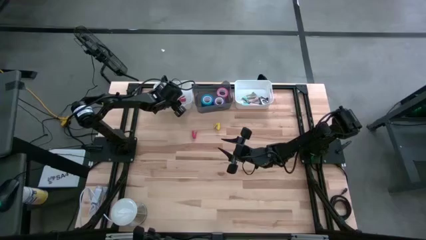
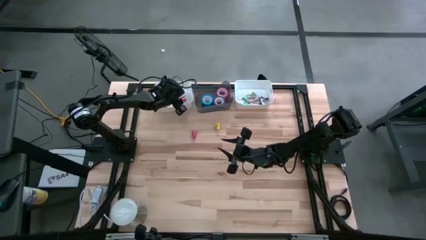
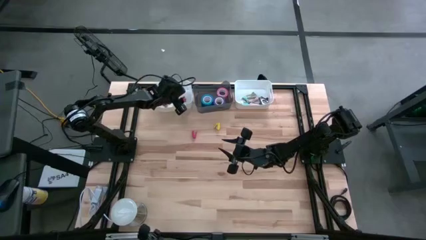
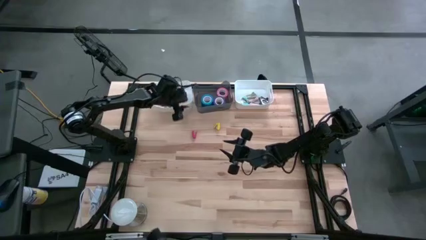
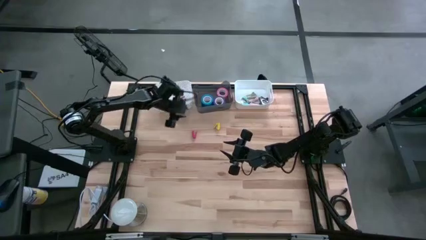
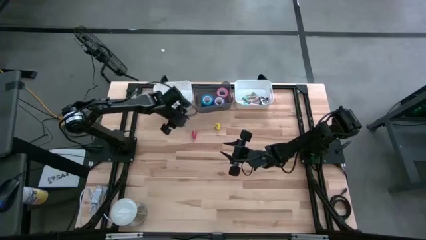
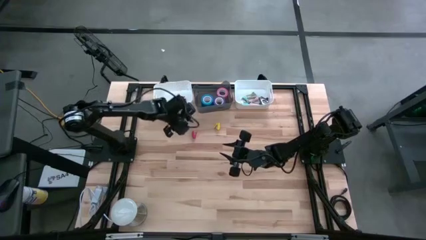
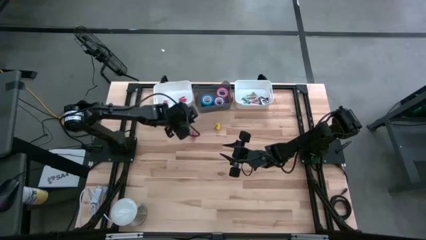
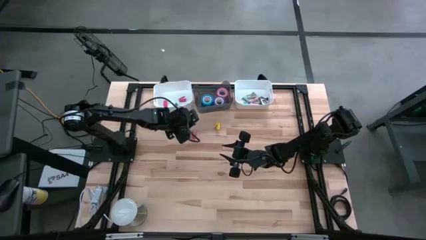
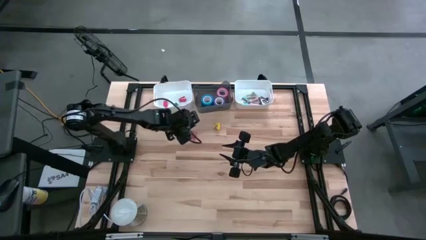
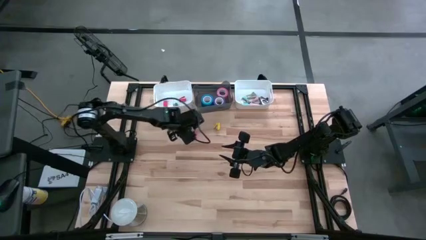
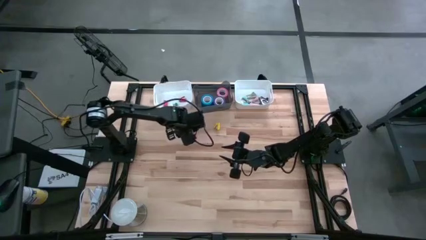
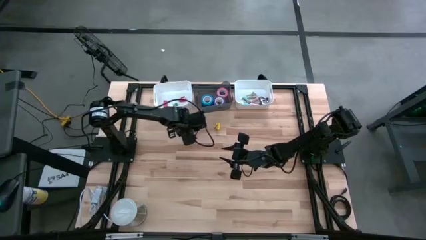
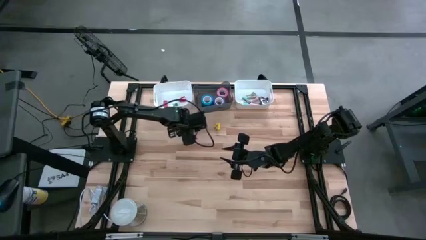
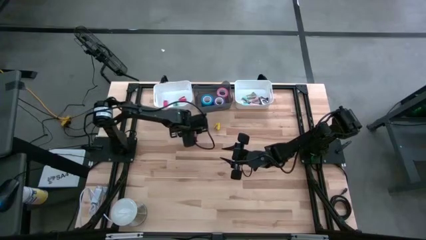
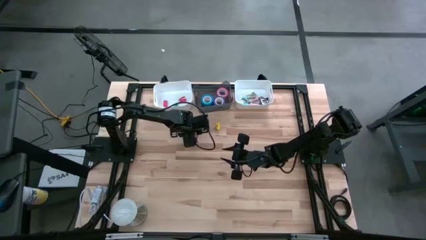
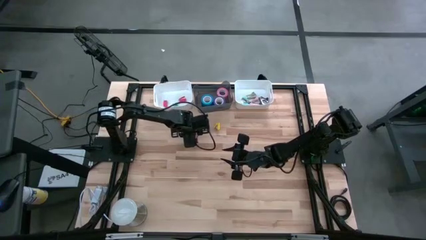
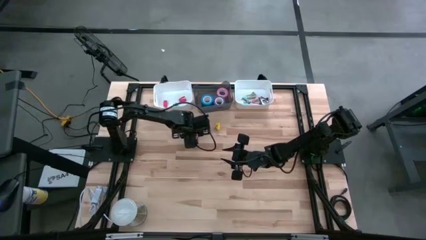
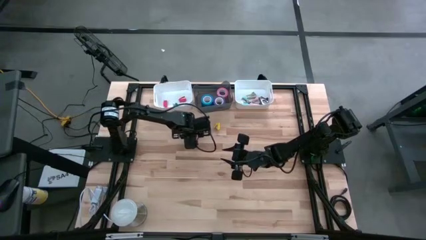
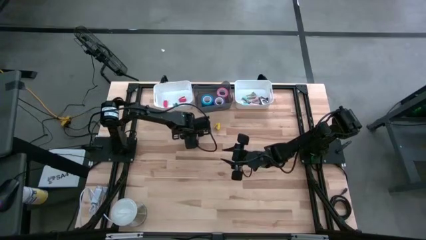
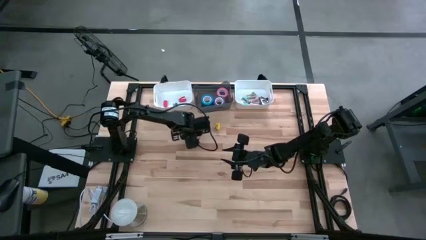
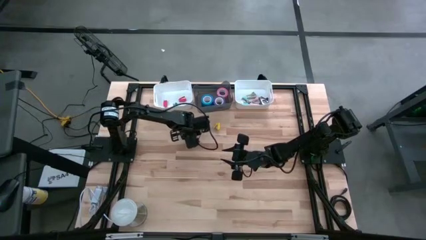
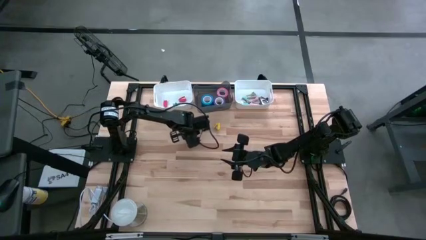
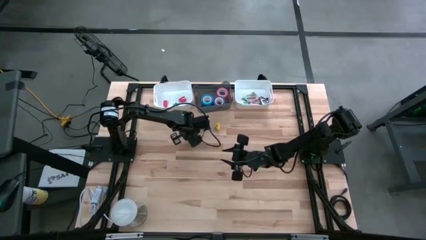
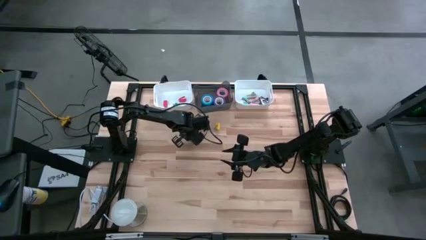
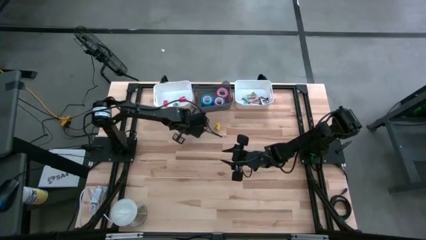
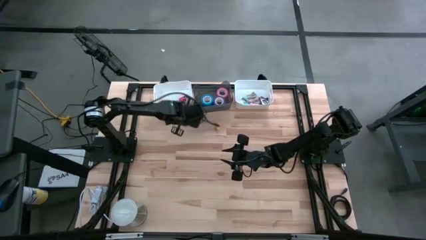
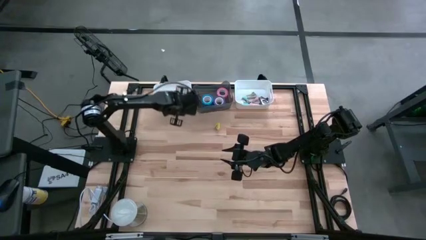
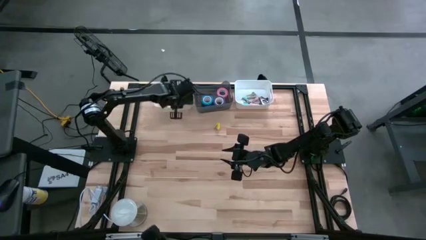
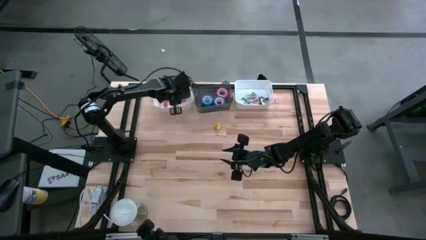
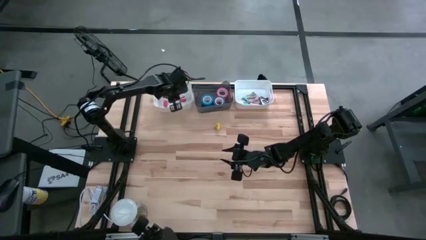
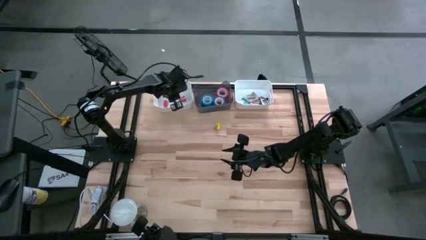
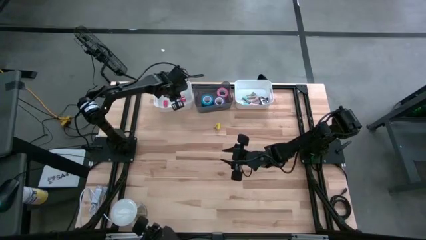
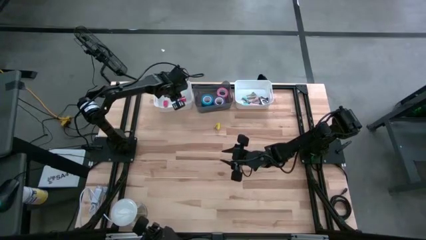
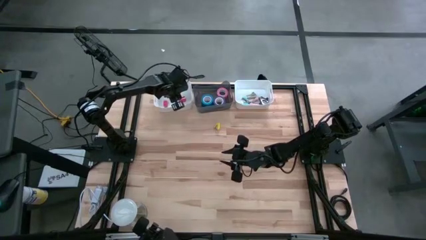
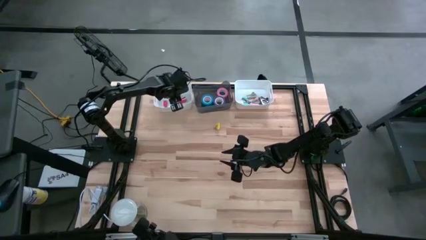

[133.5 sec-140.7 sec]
Task: Pick and place Stapler, Stapler remover, tape
Put the red stapler into the left white bin

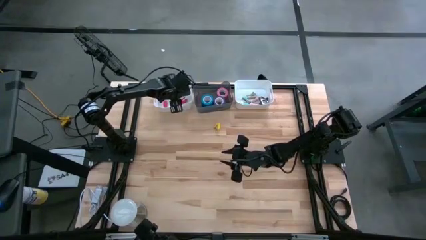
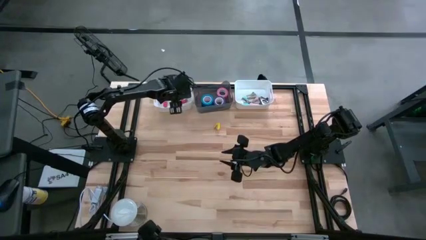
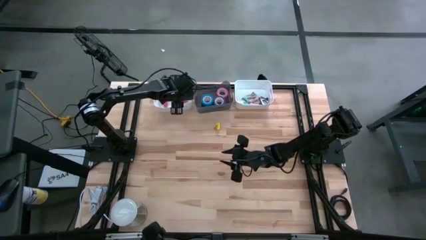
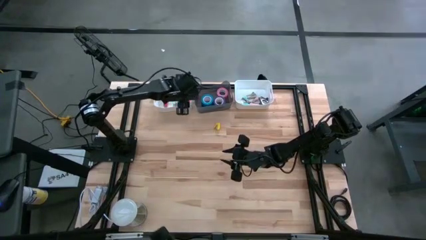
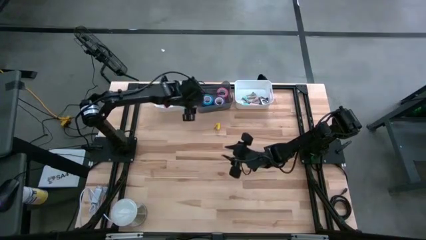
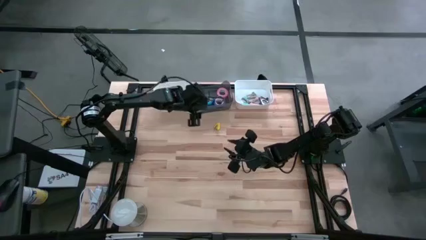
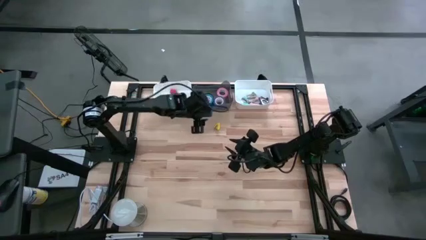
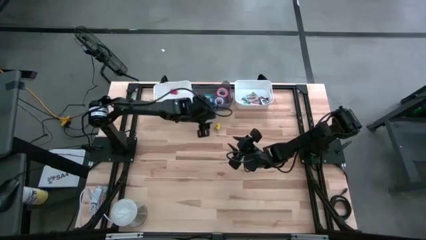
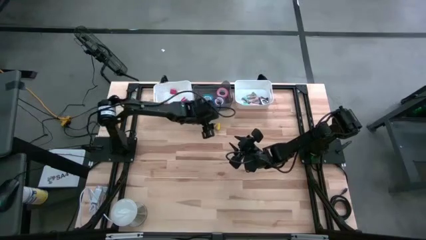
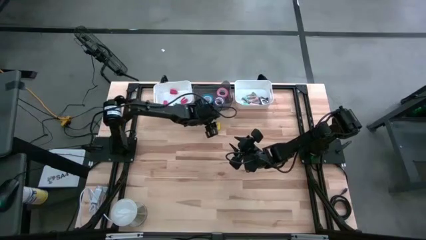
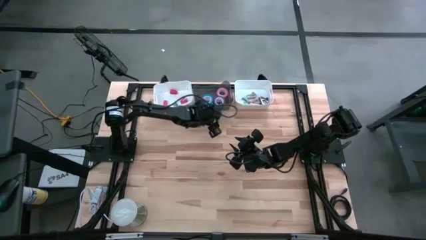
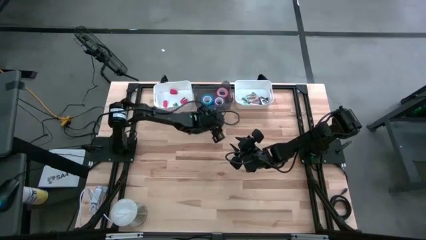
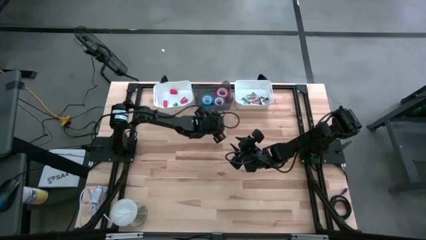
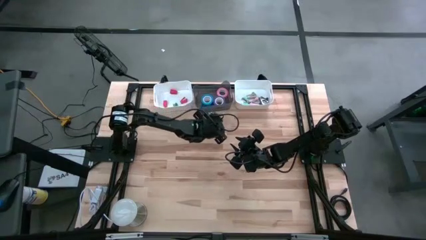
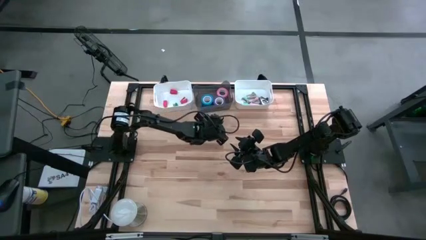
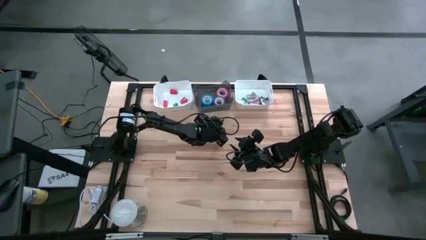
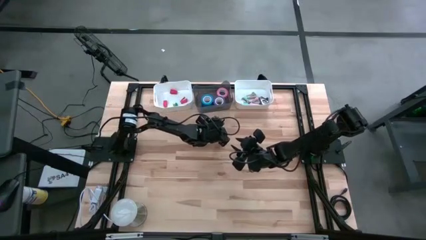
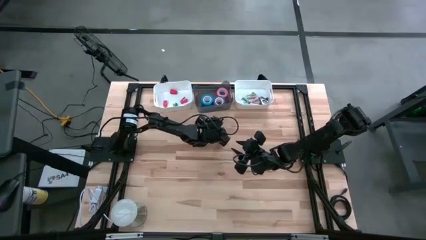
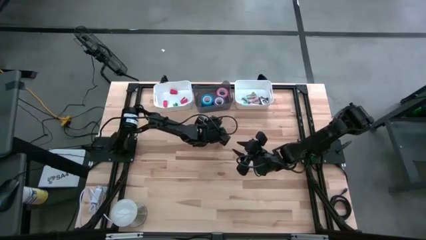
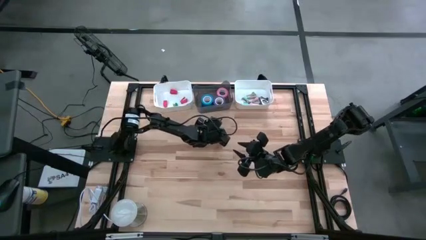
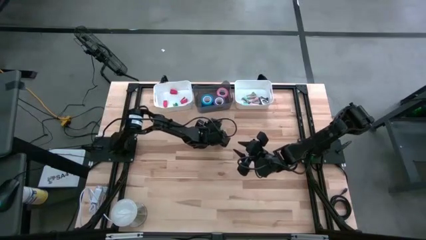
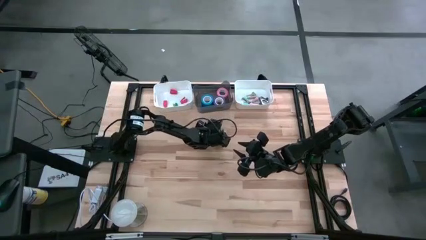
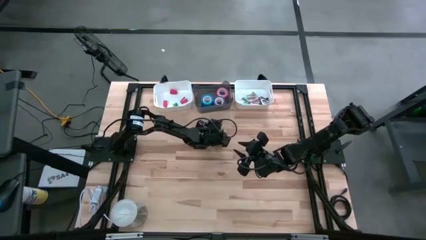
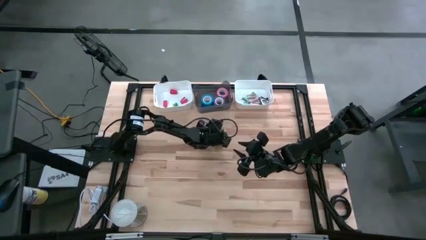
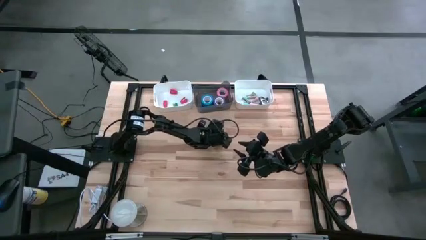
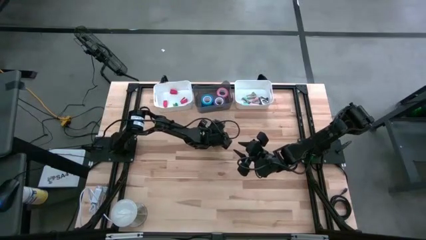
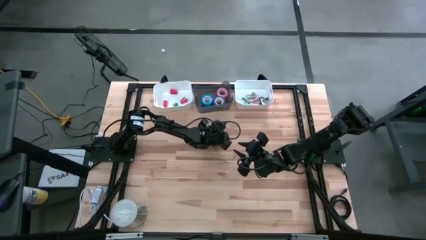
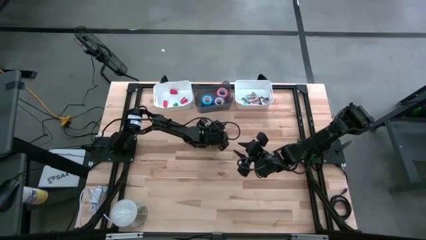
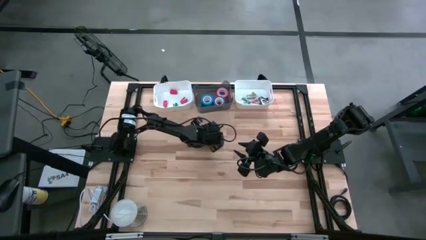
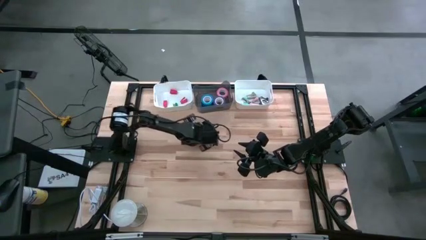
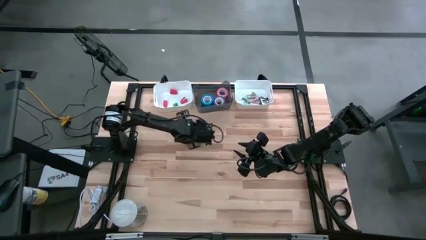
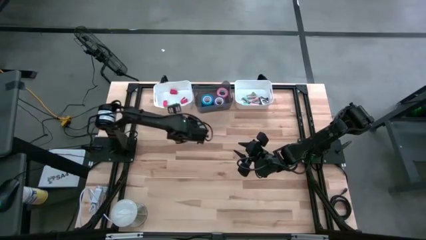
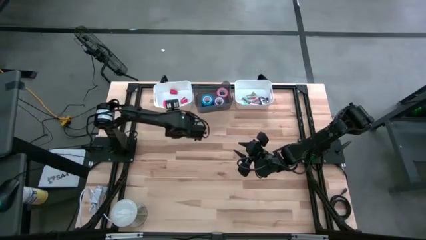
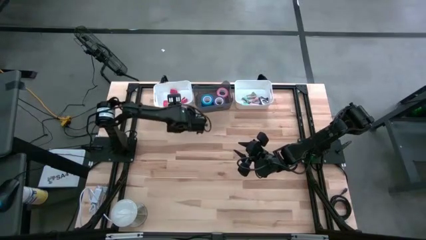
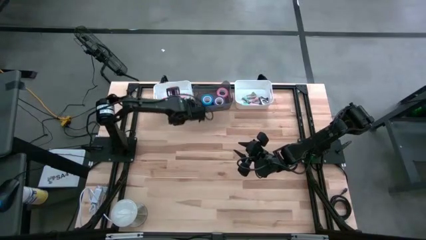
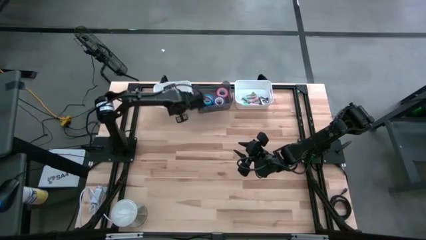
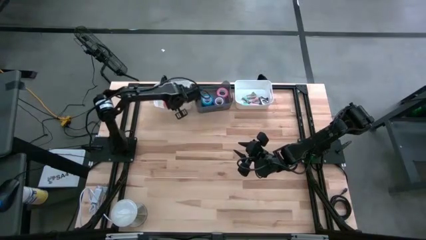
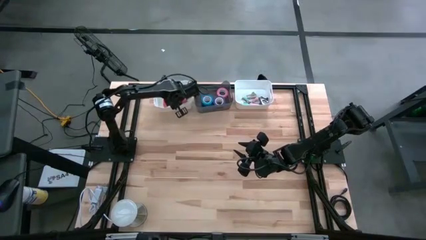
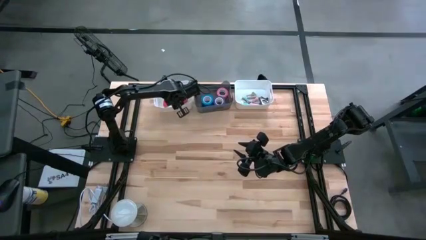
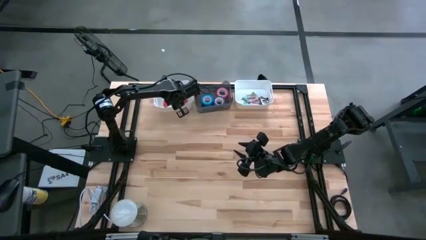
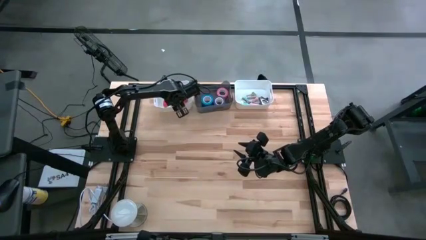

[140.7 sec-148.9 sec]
Put the yellow stapler into the left white bin

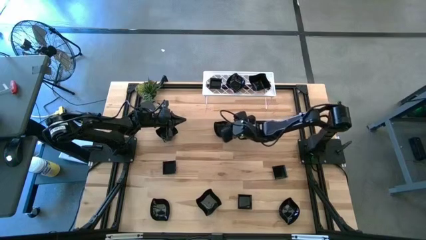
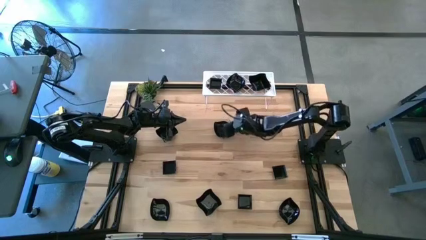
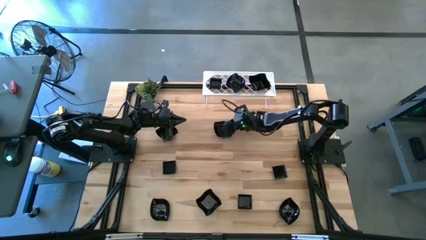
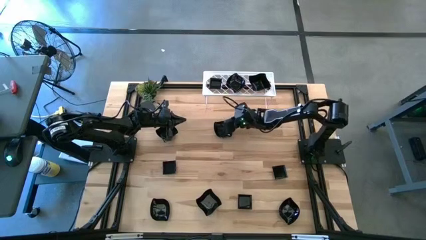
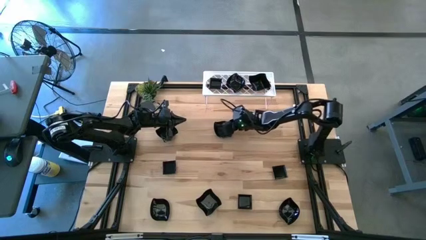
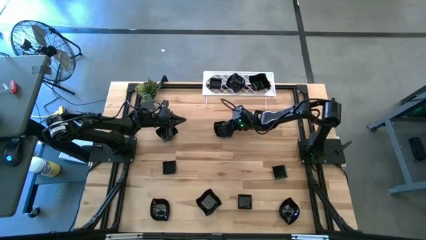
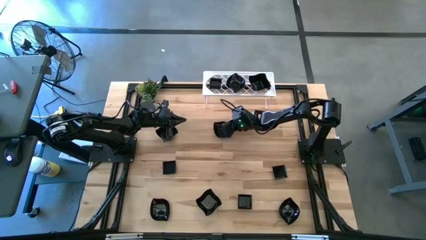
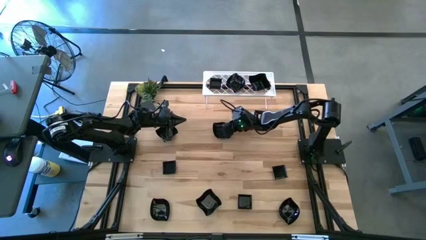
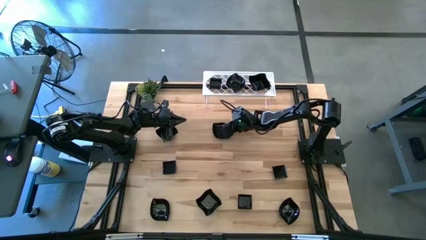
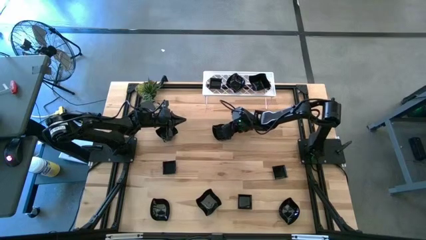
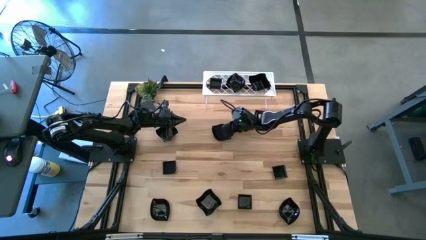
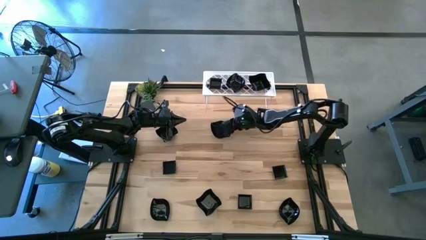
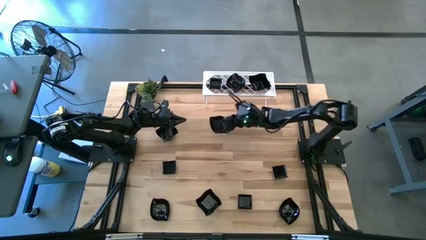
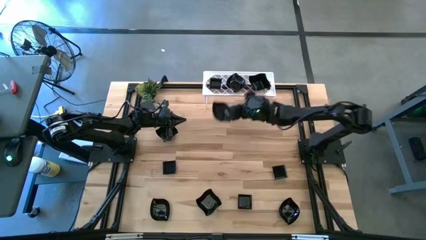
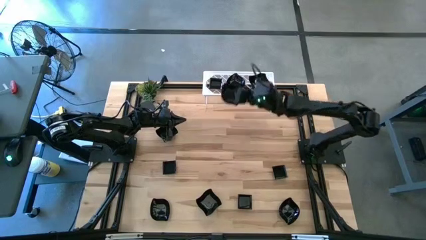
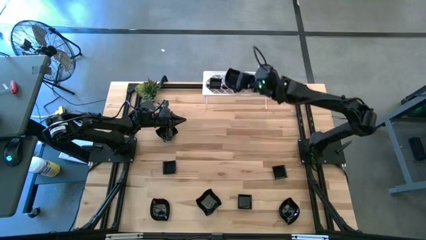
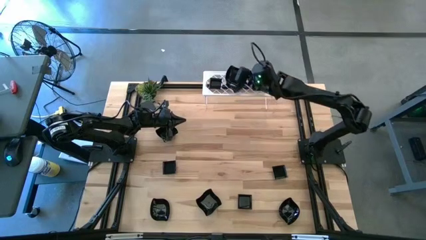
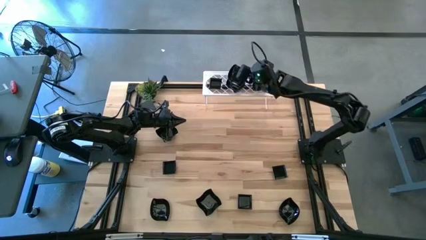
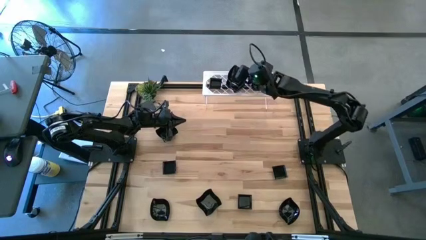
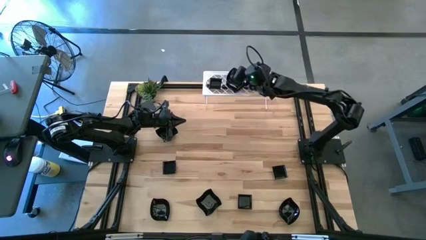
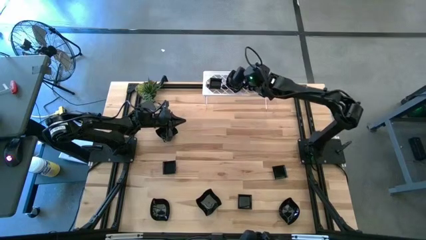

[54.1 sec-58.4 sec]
Task: Pick & Place Mini shaped plates
Stack the leaf shaped plate on top of the leaf shaped plate on the shelf
